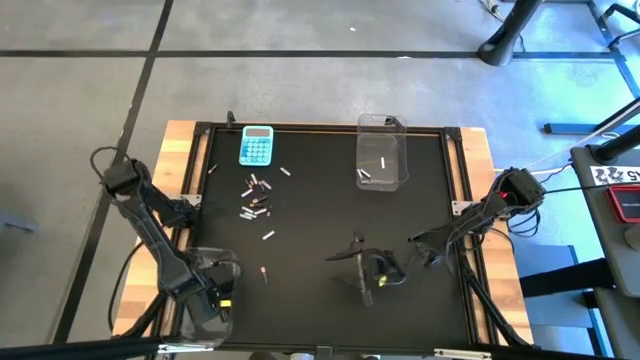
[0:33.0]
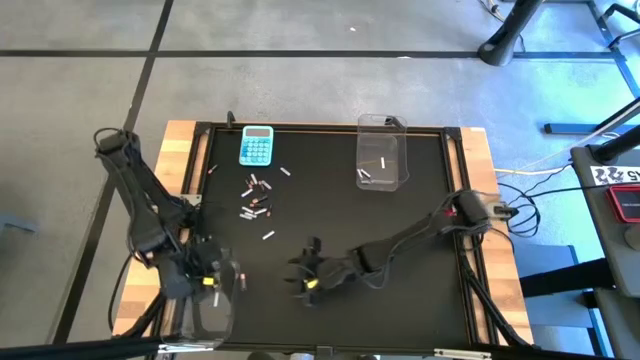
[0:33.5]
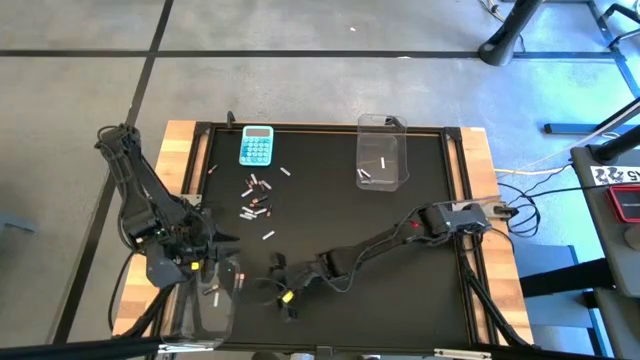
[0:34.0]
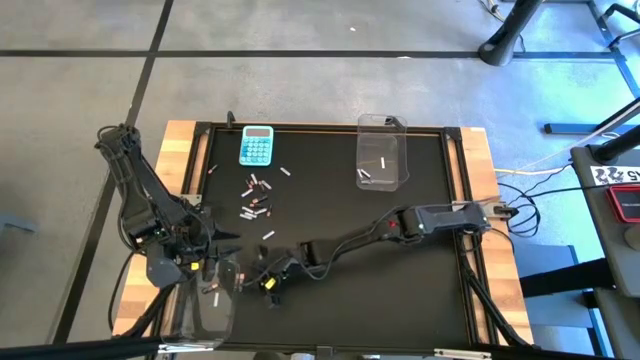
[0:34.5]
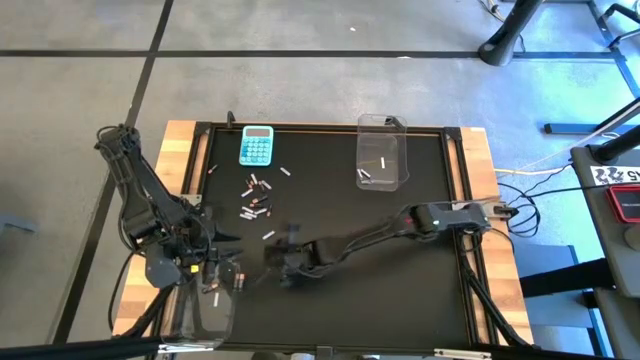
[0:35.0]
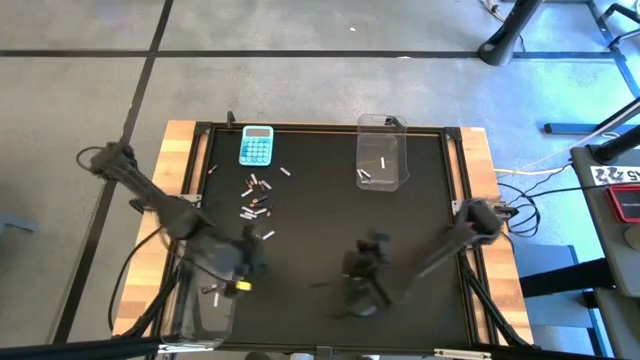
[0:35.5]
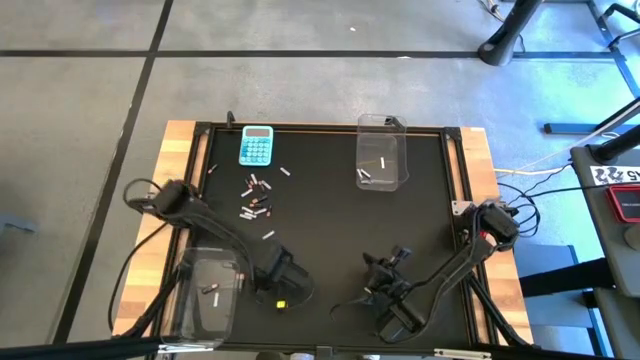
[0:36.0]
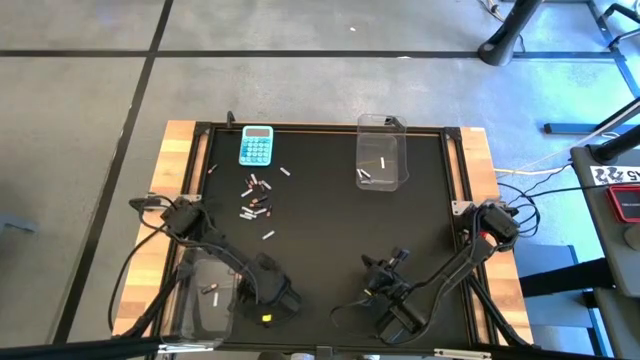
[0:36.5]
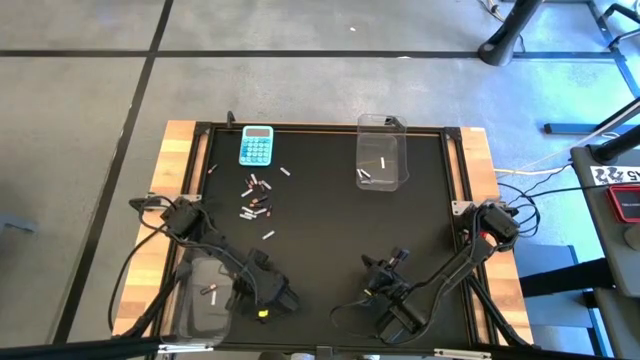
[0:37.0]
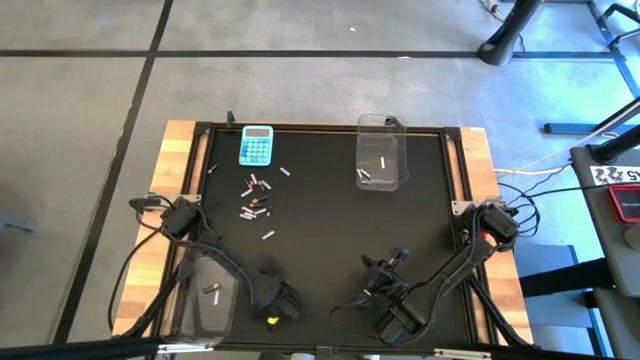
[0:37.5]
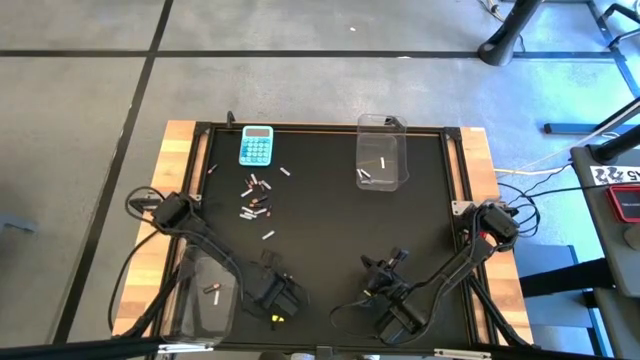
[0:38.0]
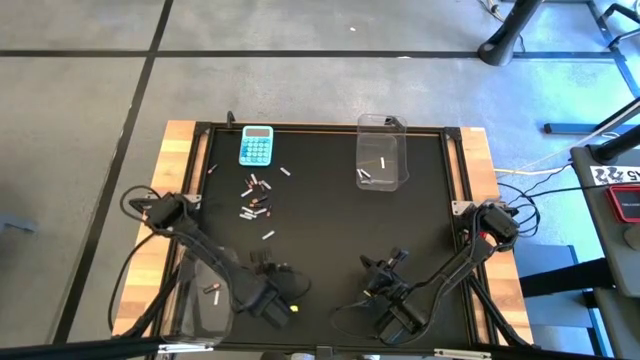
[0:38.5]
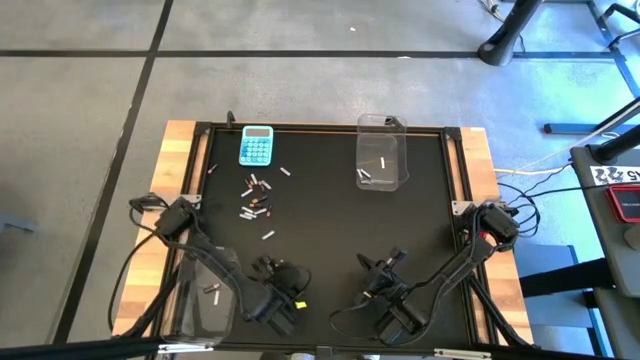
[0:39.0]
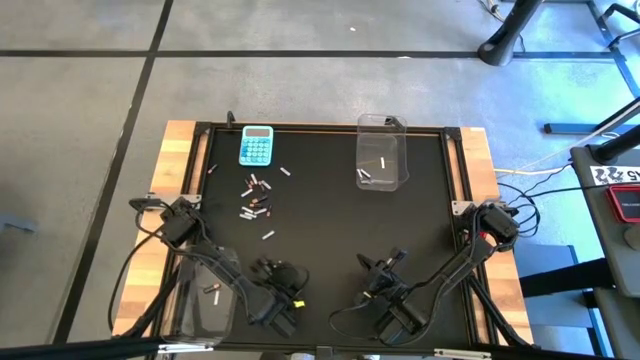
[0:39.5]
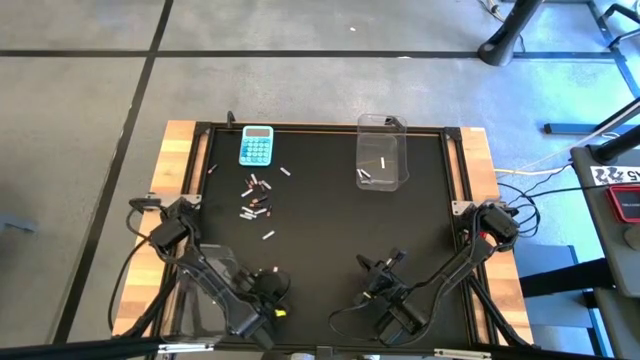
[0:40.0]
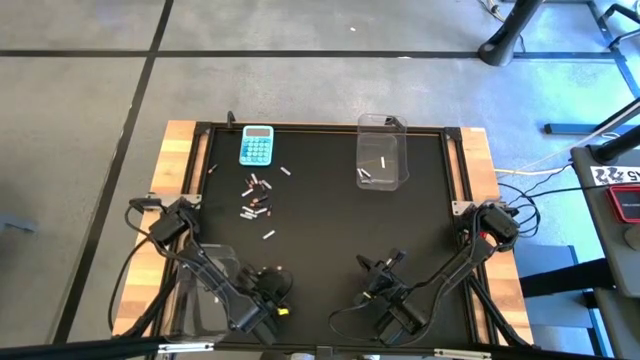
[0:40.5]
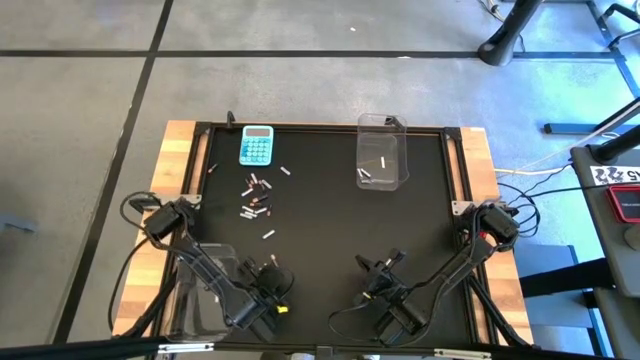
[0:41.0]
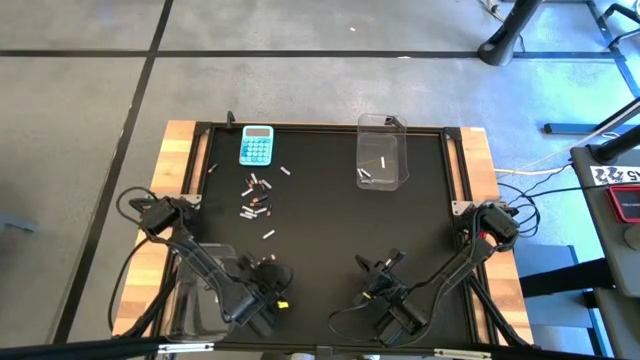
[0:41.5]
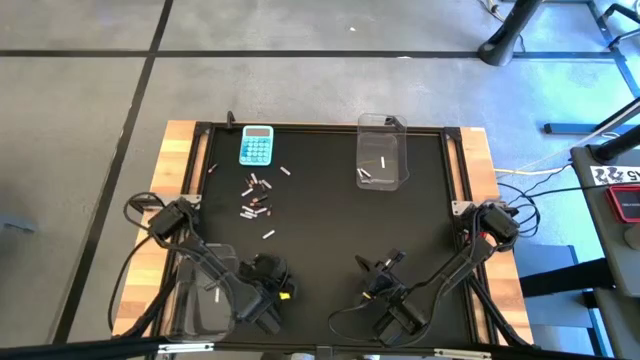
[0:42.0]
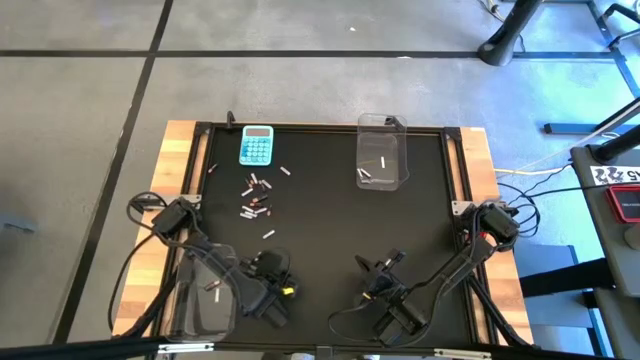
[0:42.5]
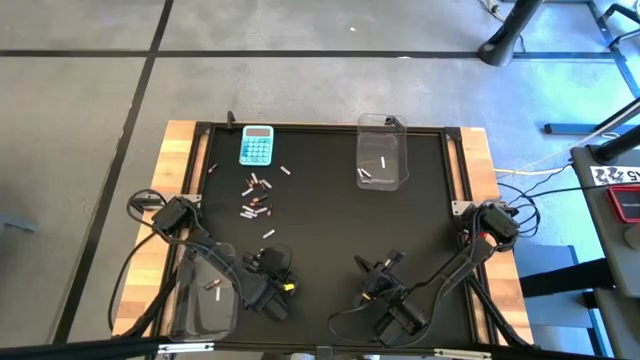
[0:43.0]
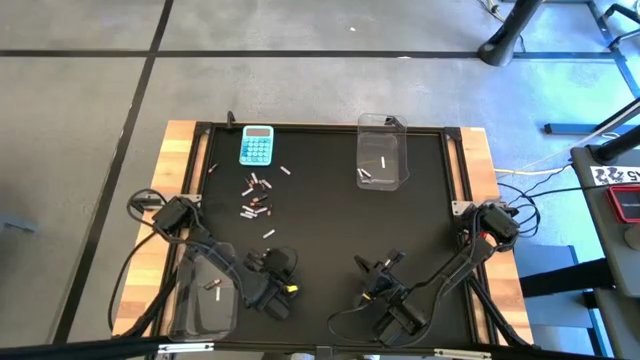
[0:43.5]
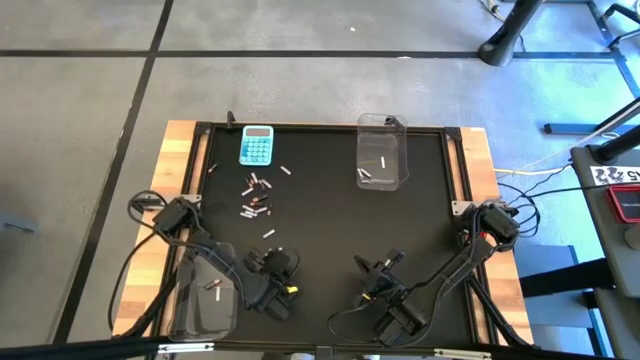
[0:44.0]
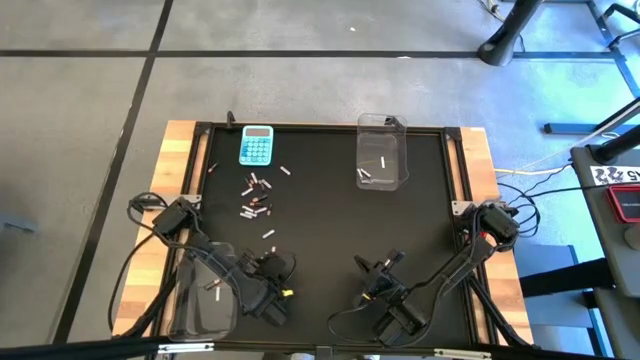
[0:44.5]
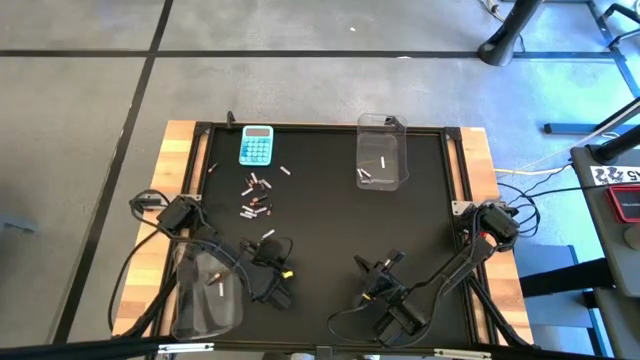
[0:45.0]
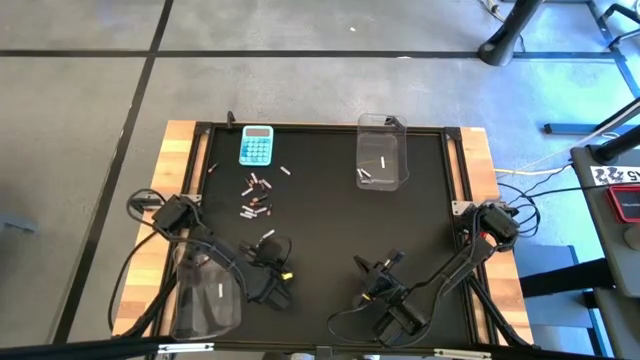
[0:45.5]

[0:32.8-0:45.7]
Task: Sort batteries
Put the black battery into the top transparent bin

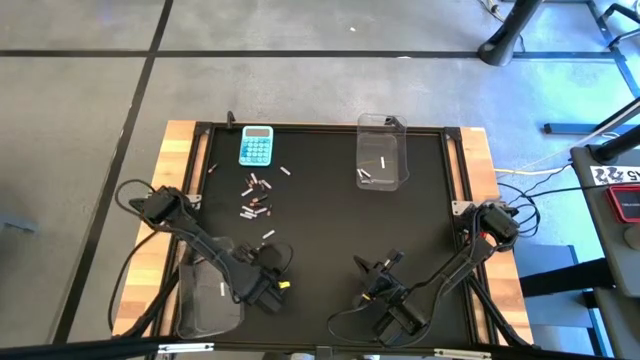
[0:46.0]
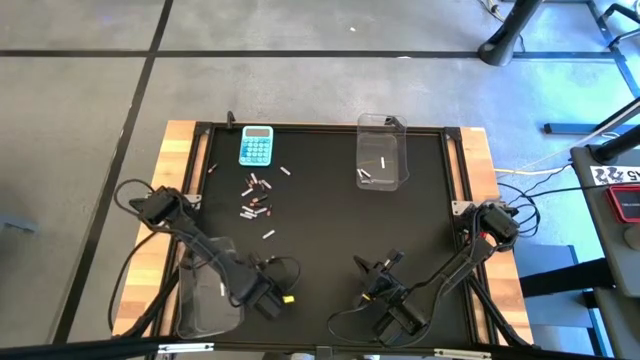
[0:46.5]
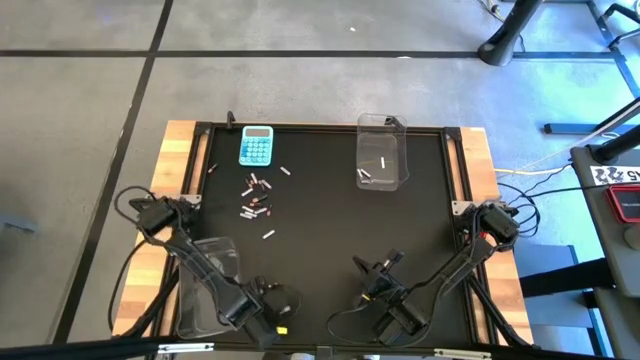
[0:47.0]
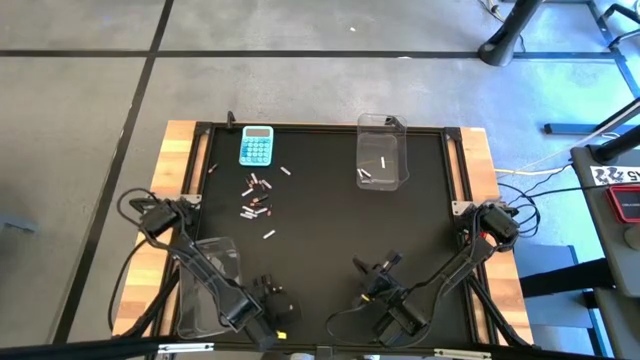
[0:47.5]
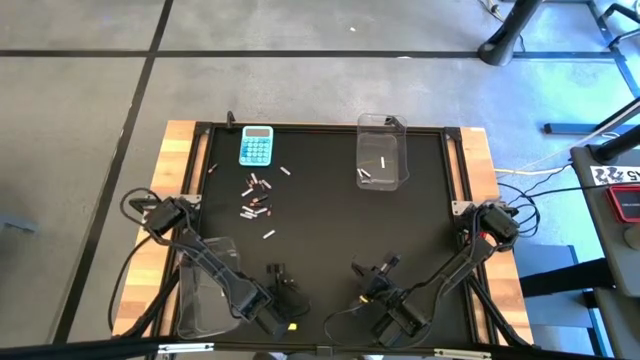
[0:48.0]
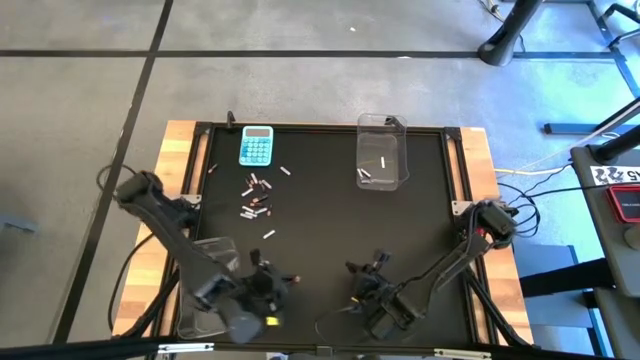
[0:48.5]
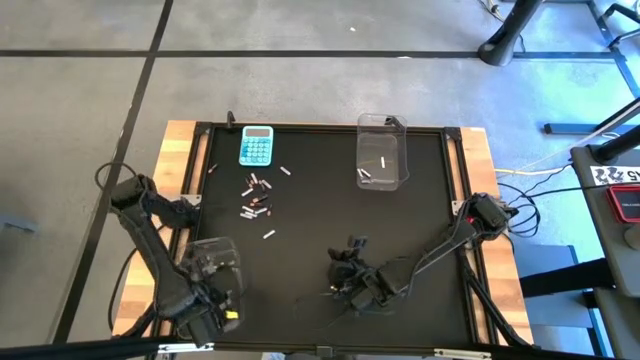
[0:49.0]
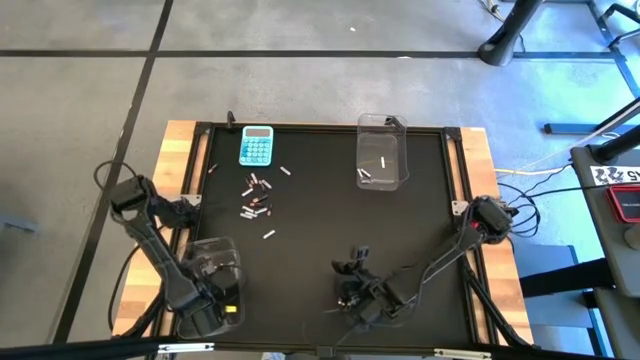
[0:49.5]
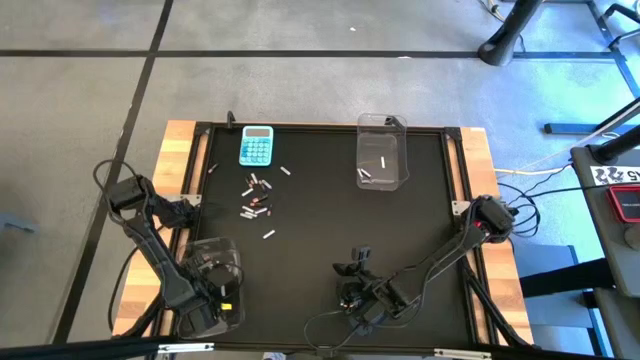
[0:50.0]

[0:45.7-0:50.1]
Put the black battery into the top transparent bin

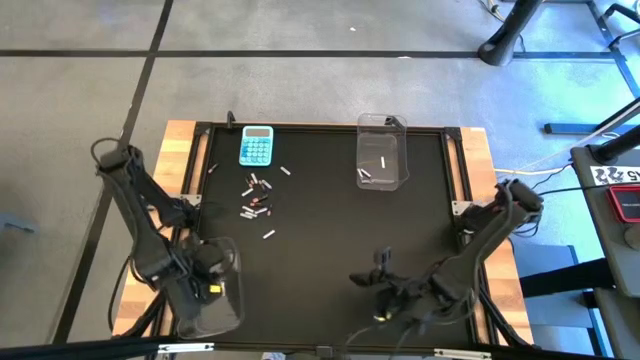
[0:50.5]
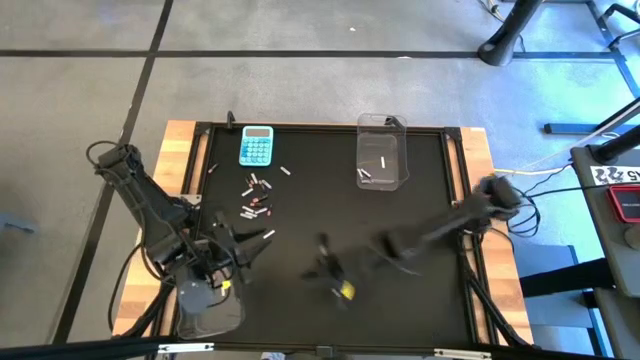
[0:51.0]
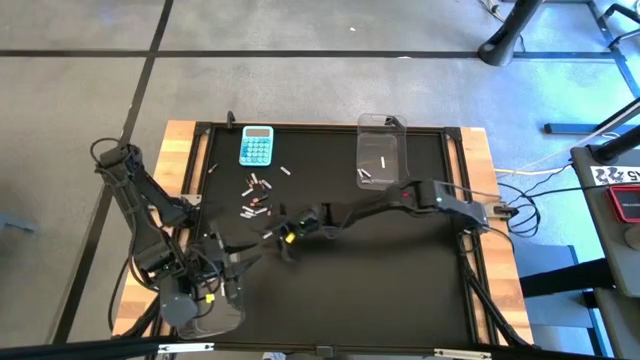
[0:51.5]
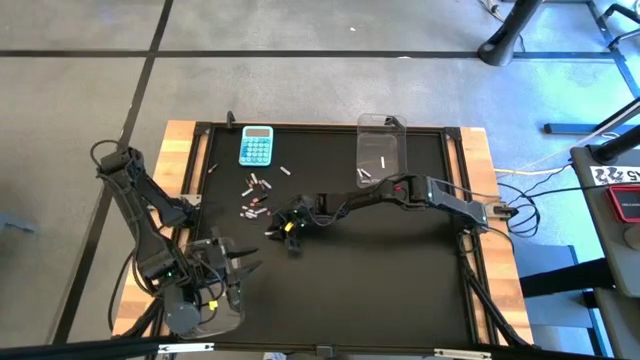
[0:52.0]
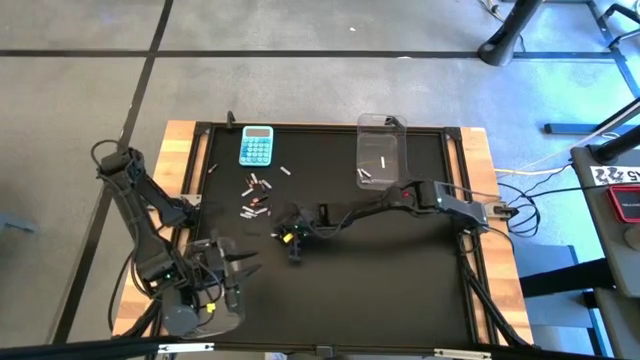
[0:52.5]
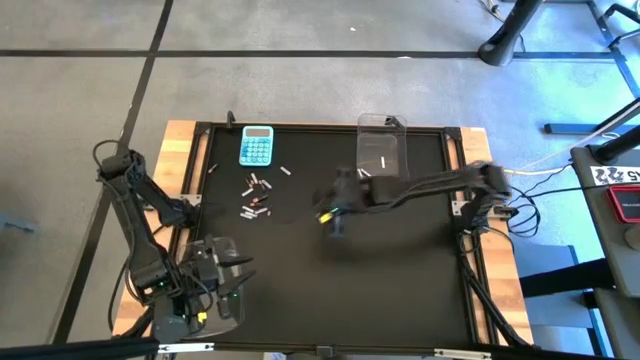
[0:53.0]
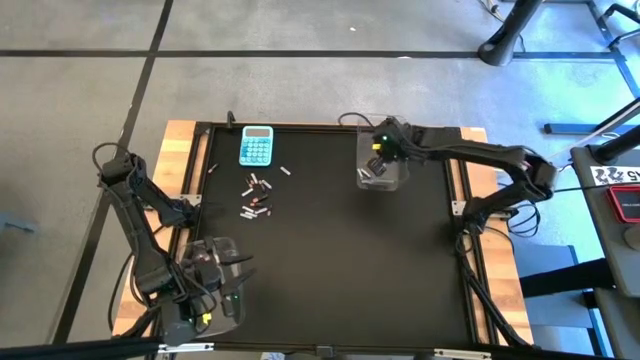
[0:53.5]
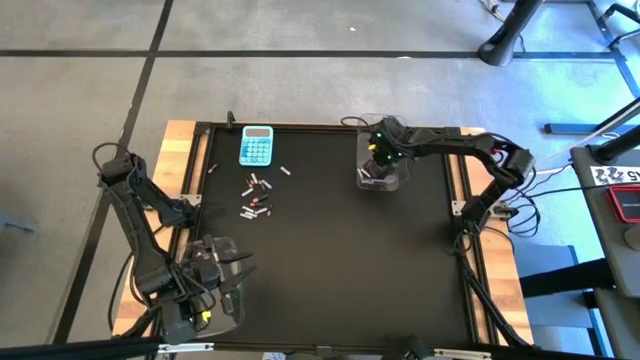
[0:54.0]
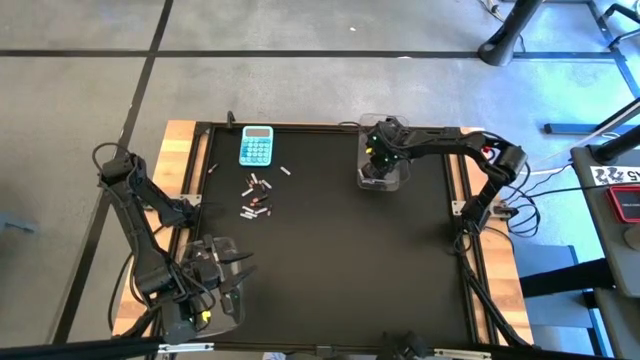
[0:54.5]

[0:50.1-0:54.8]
Put the white battery into the top transparent bin

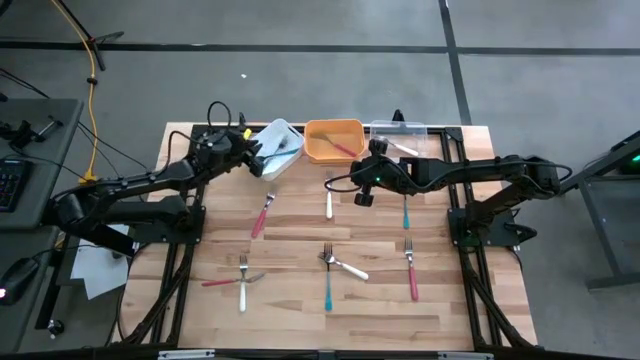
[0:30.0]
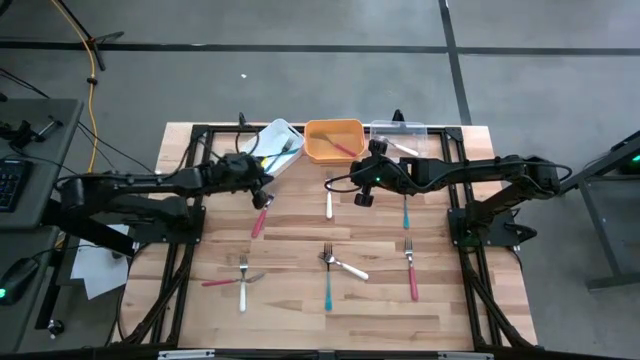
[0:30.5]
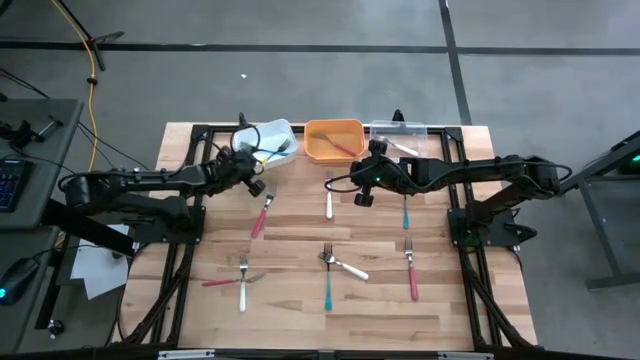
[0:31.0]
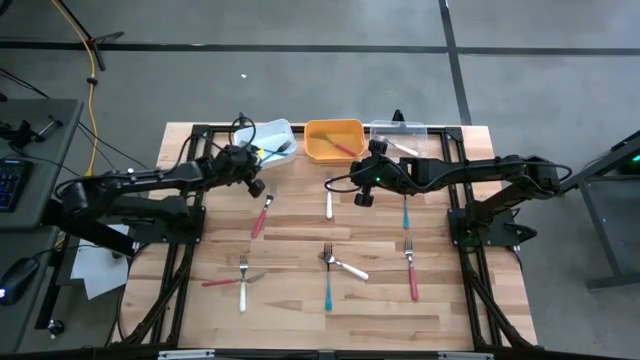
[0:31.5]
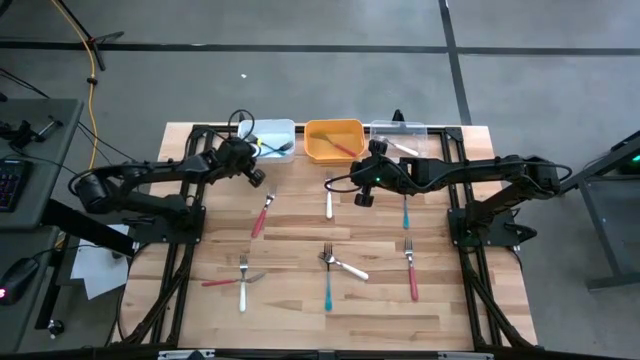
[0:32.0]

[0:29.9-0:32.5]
Task: Sort silverware by color (type)
Adjust the white bin
